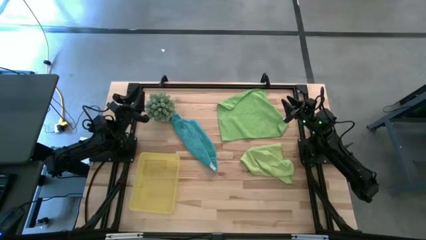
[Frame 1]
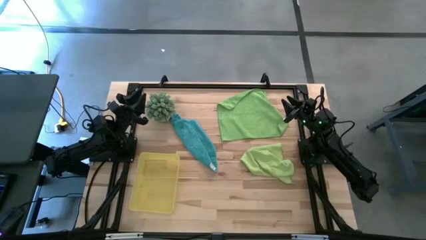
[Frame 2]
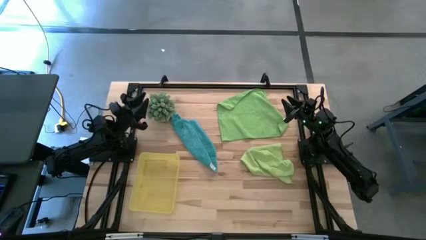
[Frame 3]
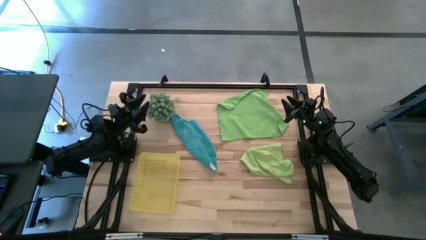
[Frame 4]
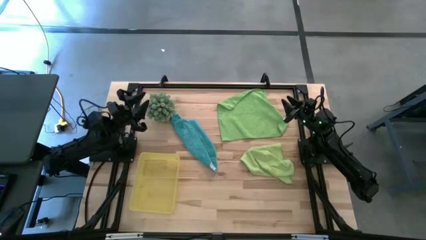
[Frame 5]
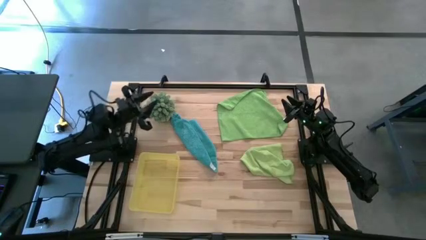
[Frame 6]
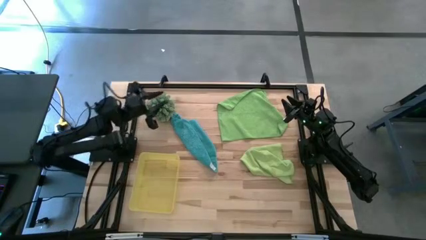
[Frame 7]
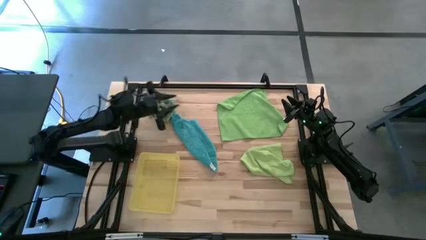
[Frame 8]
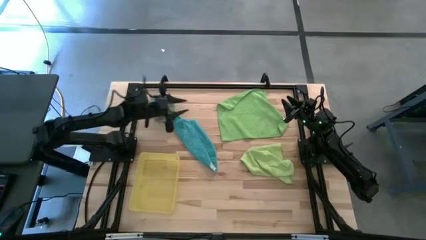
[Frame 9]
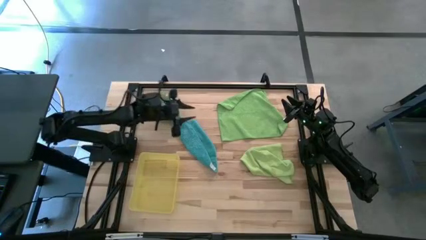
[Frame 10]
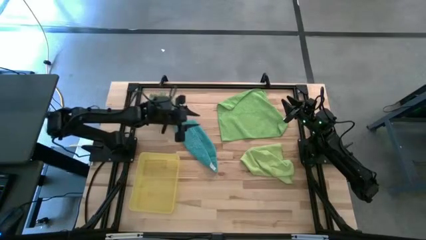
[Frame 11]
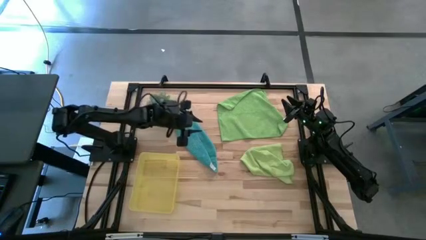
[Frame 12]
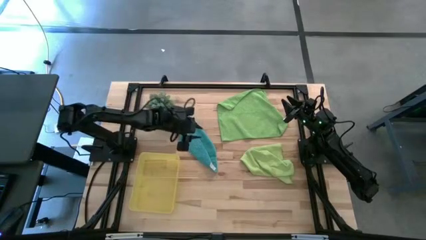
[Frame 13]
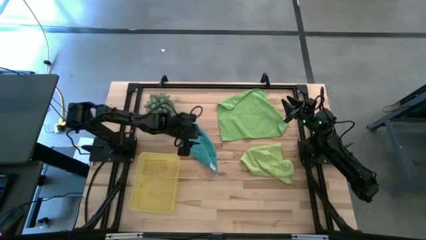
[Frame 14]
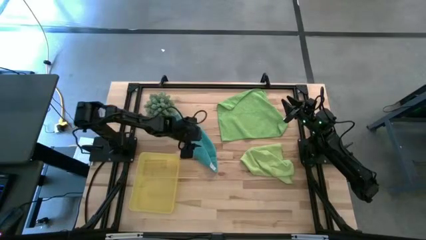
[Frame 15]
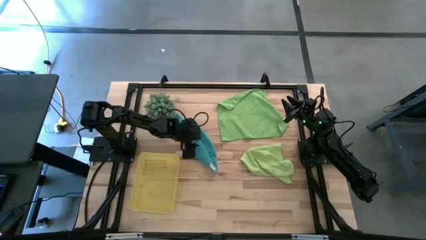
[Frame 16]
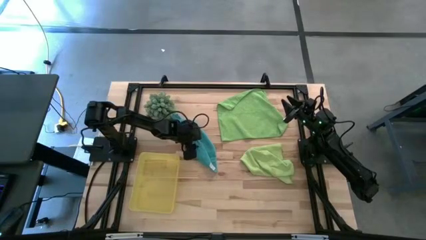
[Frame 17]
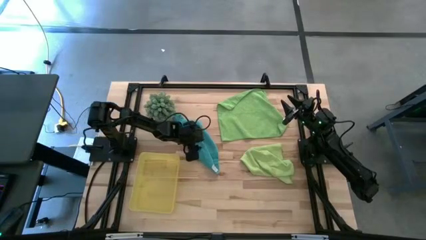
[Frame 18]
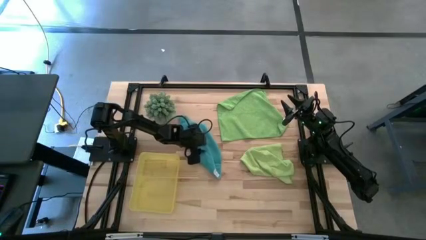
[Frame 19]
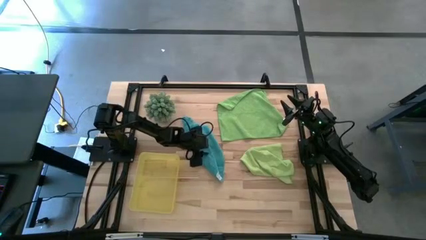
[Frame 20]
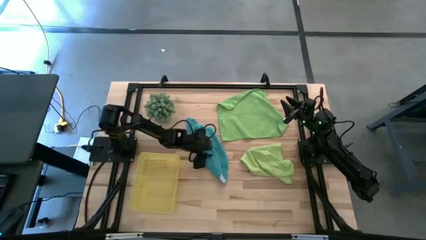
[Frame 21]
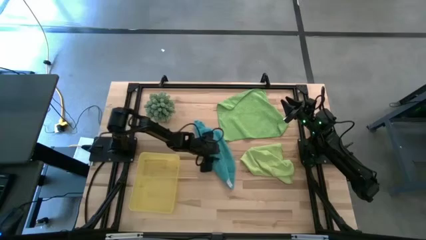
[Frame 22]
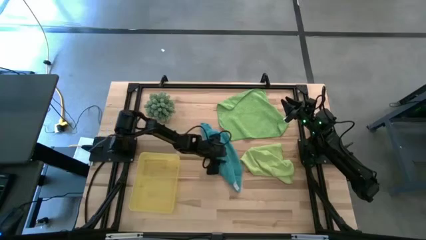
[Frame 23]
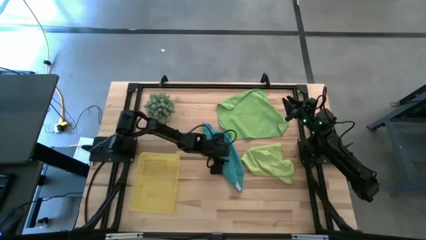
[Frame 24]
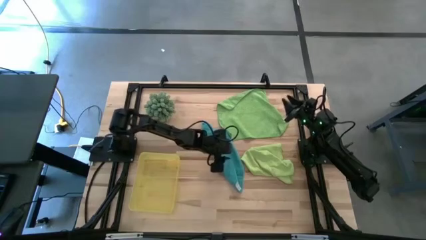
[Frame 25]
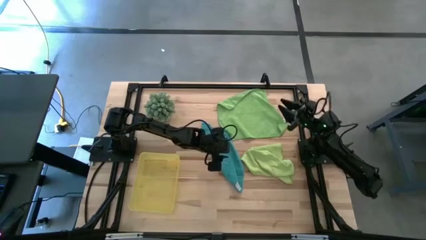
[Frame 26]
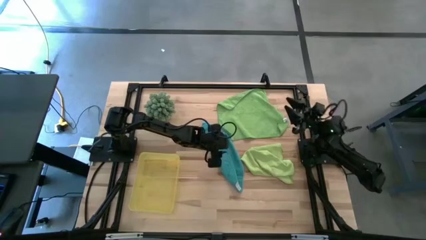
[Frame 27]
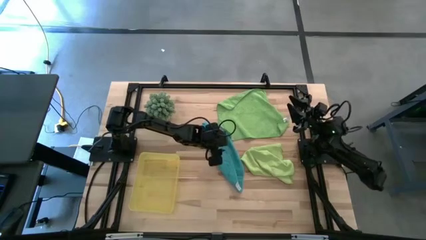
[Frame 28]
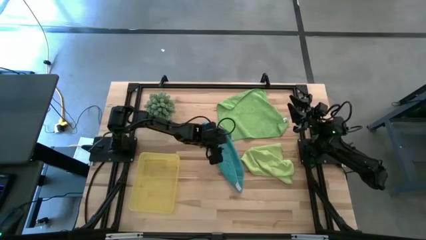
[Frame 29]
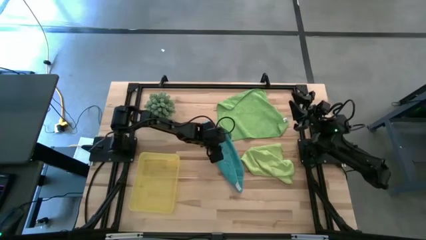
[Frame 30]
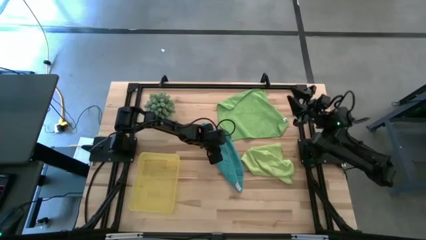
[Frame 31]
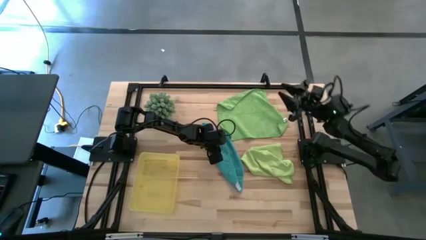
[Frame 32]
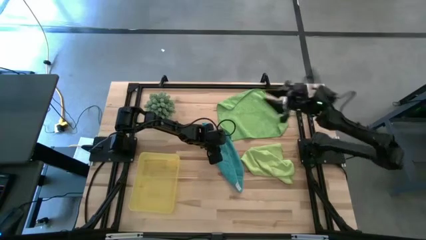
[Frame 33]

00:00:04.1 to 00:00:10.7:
Task: Roll microfiber towels into tight, uniform cylinder then place into a basket
Adjust the blue towels

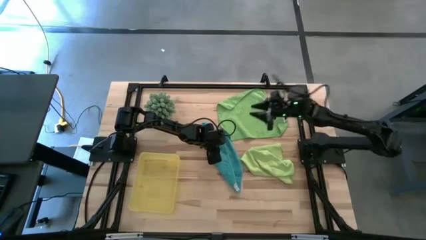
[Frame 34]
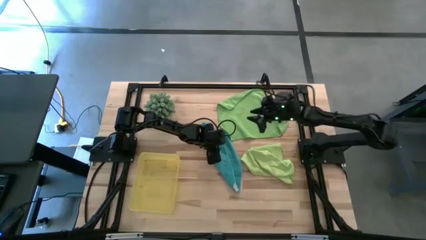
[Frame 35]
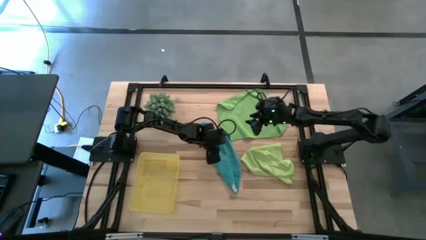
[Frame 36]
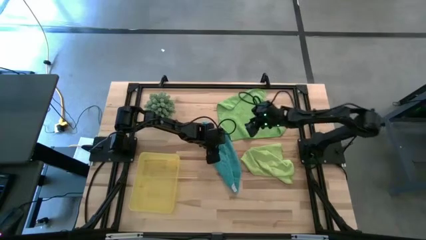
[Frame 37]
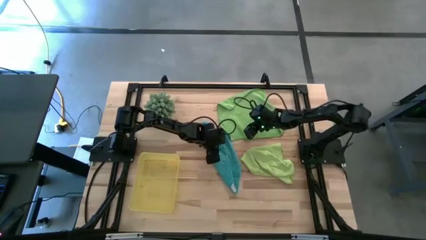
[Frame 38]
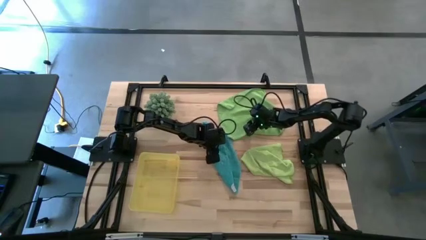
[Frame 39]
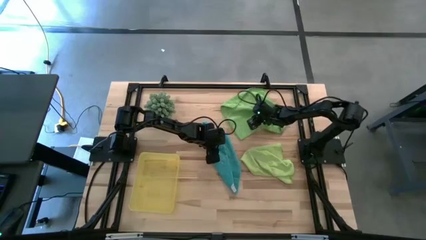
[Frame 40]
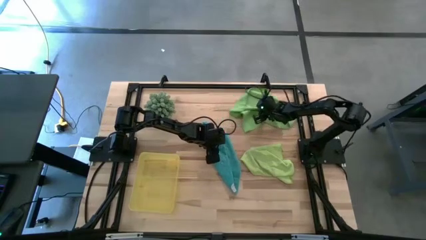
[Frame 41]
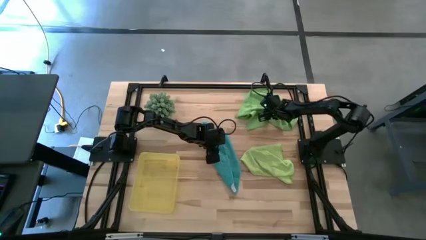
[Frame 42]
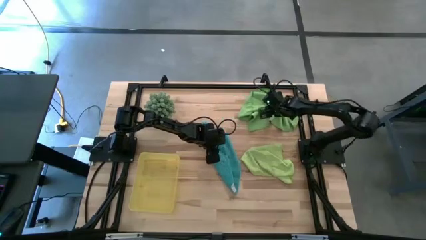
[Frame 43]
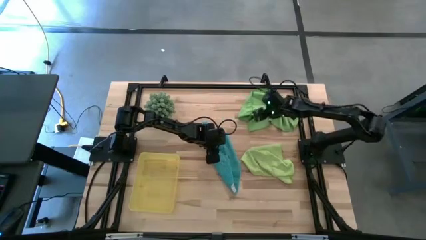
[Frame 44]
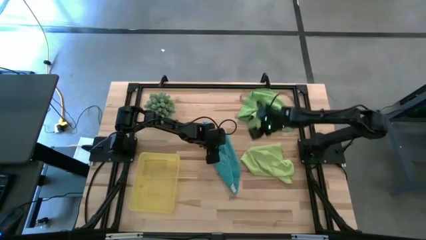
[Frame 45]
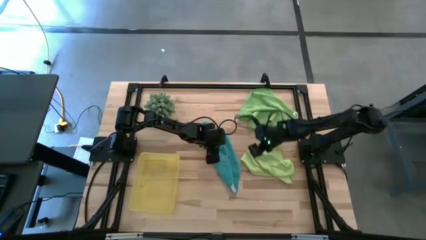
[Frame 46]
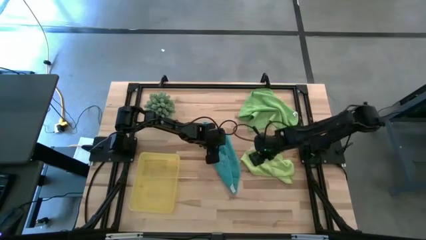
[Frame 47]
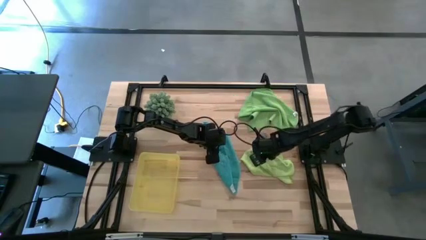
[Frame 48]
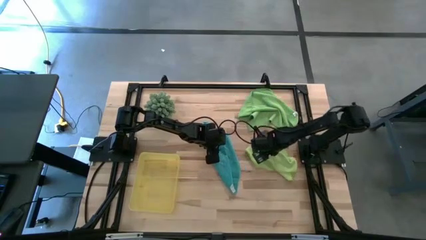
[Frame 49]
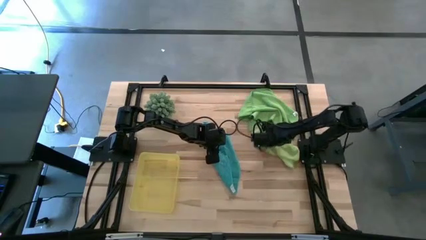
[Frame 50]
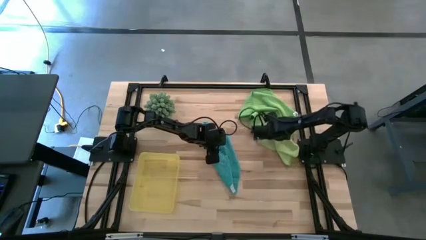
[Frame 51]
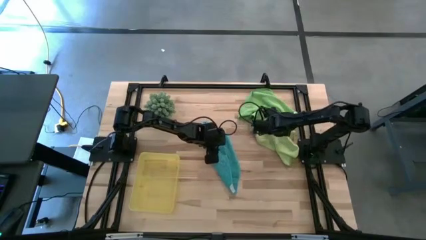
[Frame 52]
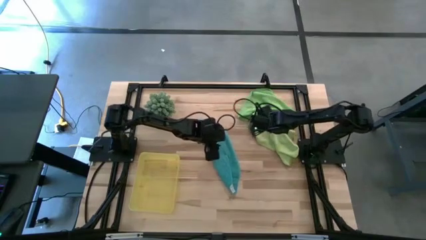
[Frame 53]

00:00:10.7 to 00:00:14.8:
Adjust the green towels

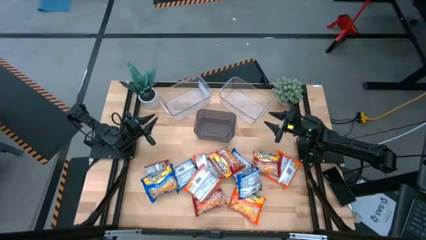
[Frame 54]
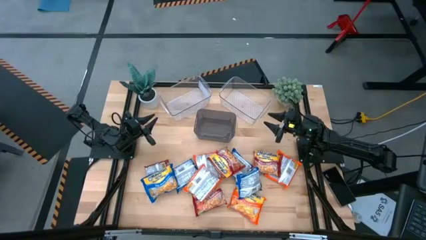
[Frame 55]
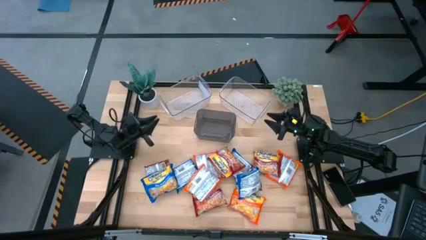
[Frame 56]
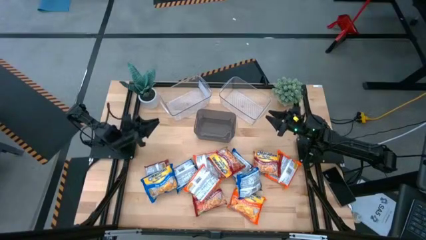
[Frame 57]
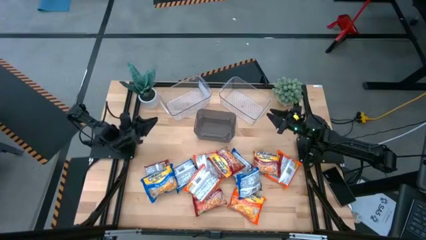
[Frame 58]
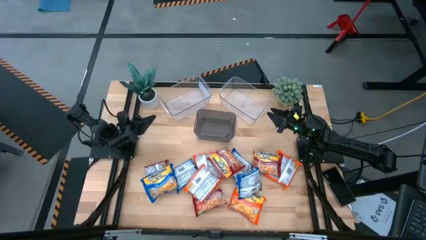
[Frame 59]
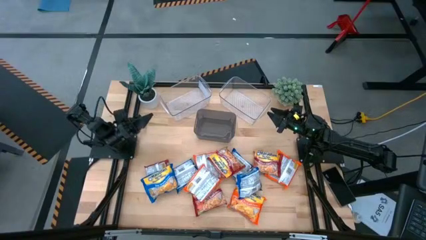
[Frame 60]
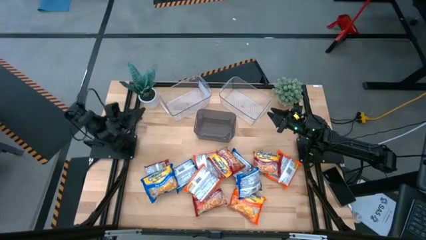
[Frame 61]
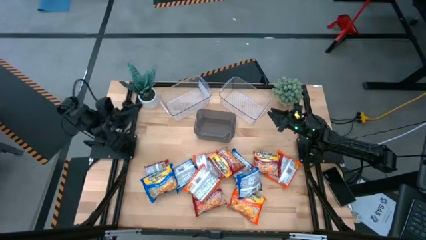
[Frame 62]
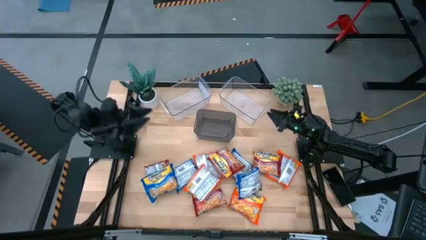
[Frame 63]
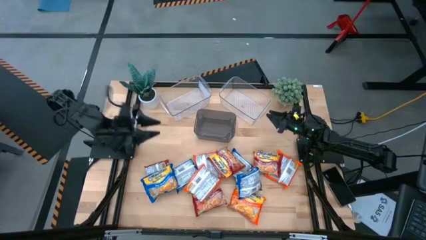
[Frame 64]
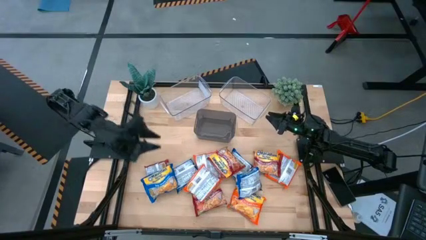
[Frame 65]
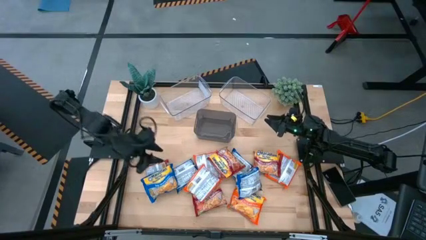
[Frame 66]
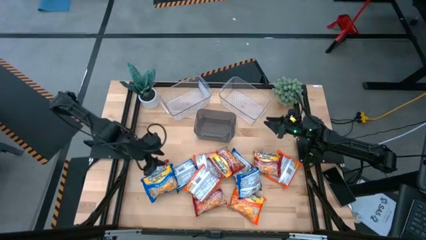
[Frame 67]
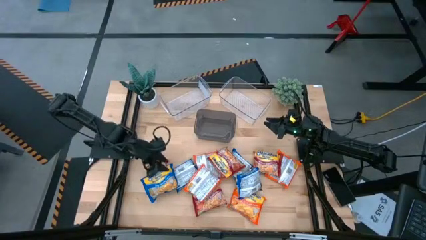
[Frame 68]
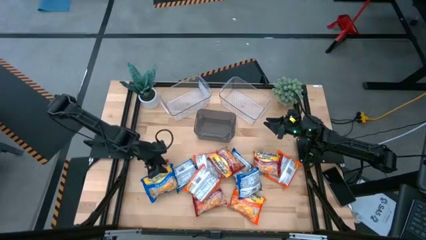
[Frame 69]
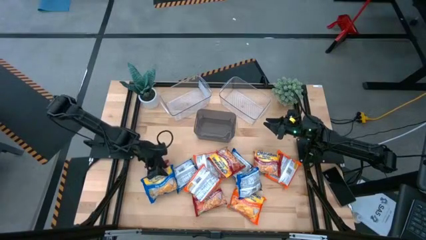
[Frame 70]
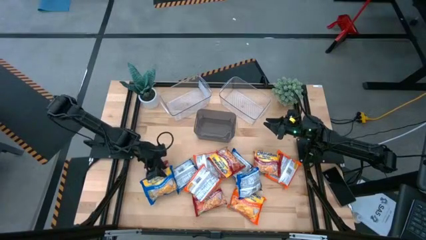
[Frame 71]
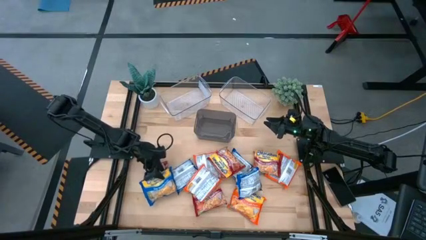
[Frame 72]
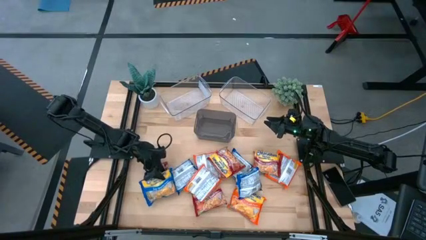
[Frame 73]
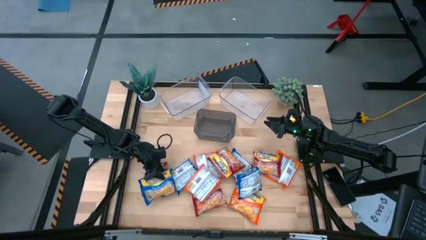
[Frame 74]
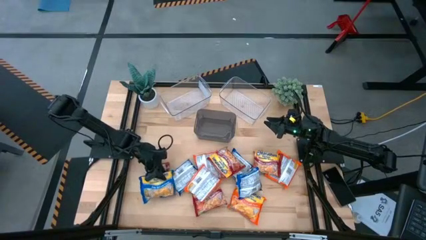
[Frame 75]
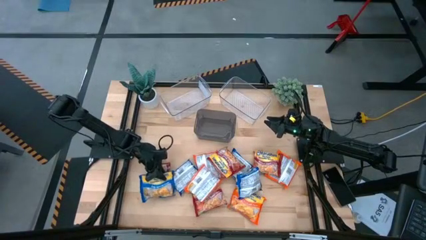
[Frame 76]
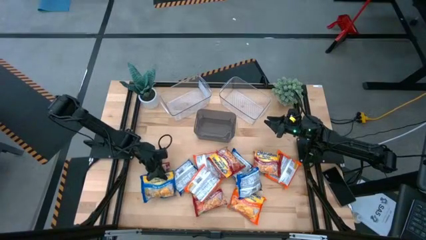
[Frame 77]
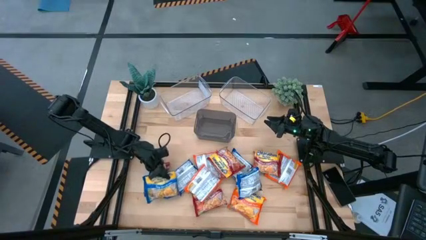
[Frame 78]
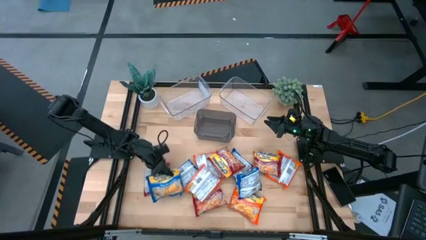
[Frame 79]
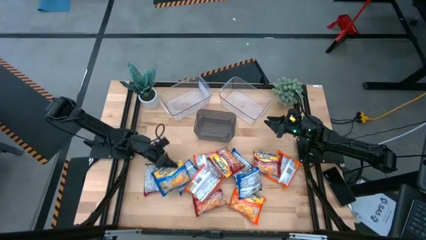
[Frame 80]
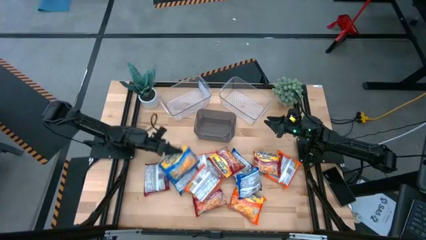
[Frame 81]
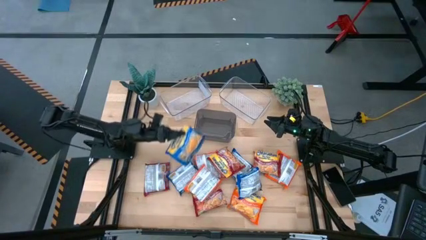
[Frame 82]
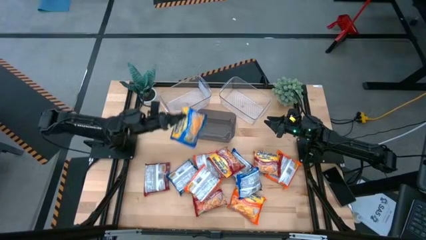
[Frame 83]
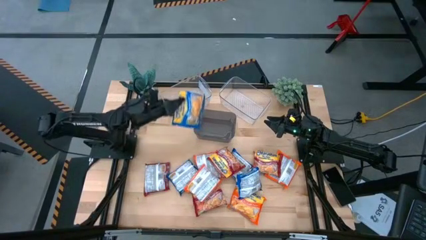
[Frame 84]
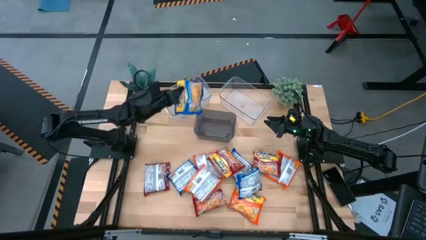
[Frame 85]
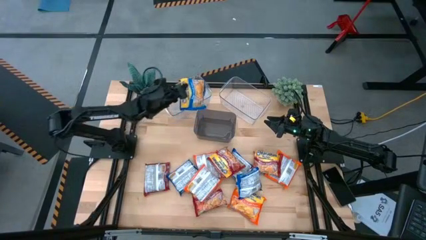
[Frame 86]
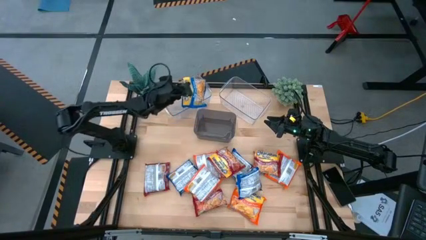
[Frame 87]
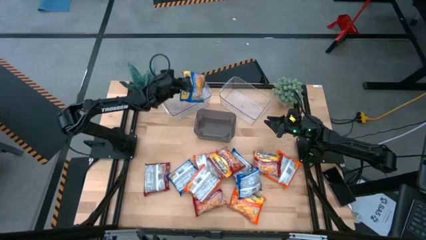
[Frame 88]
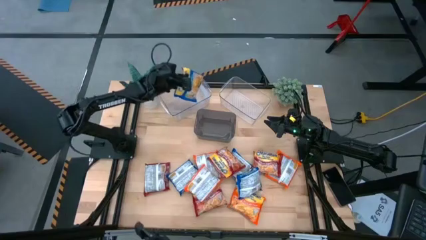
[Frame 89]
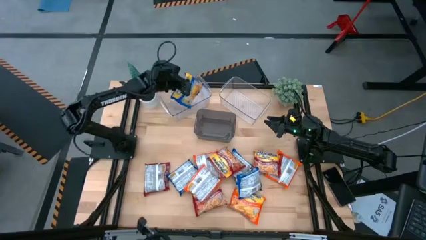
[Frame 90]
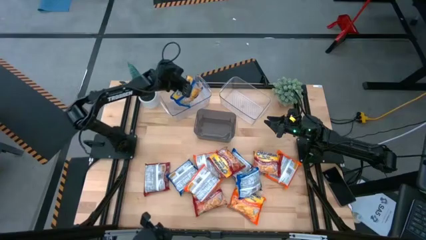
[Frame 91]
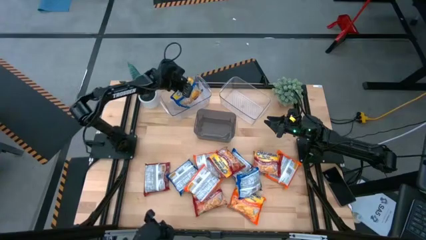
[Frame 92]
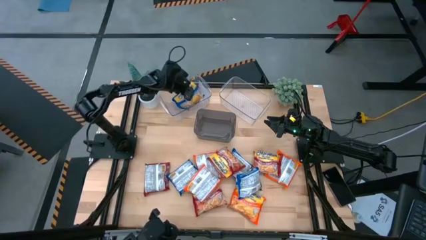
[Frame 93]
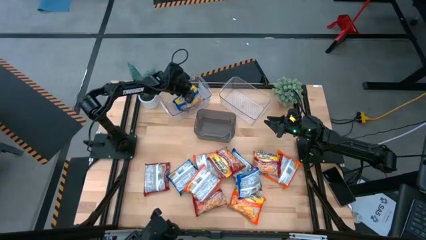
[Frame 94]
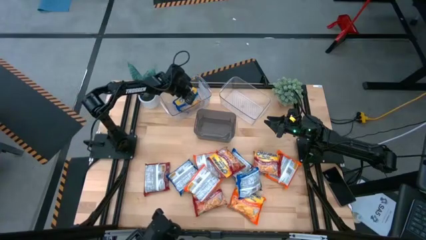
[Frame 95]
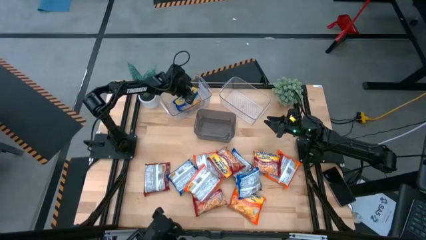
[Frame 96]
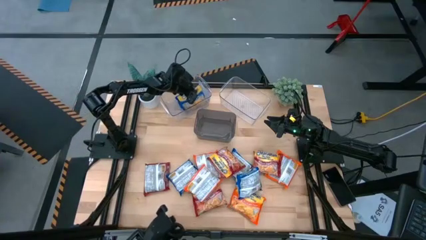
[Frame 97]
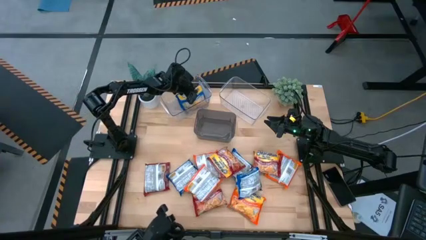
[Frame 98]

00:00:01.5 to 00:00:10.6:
Task: Sort Maruchan noodles
Put the blue noodle pack into the left transparent bin
